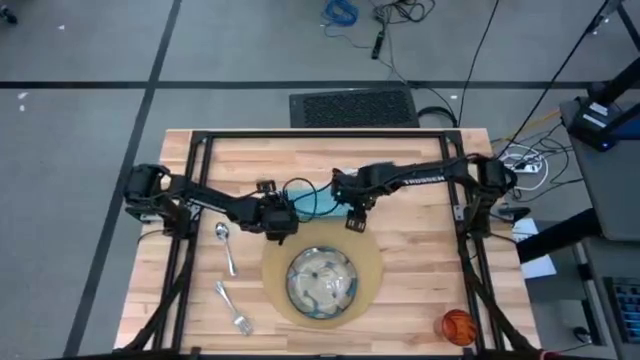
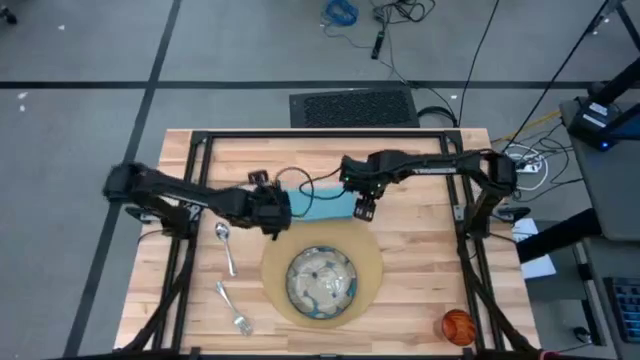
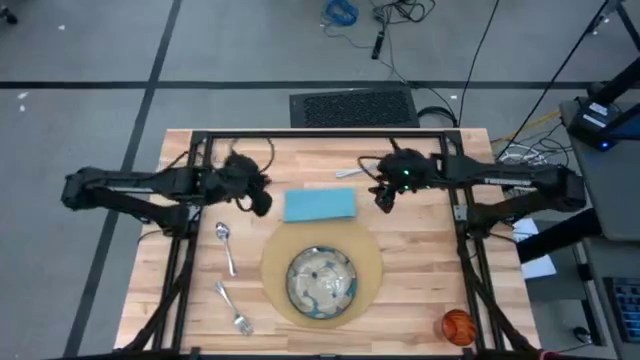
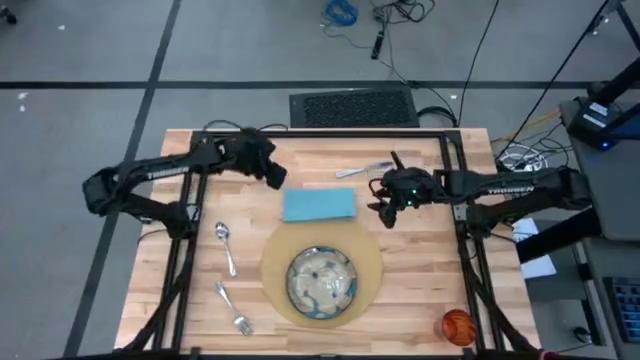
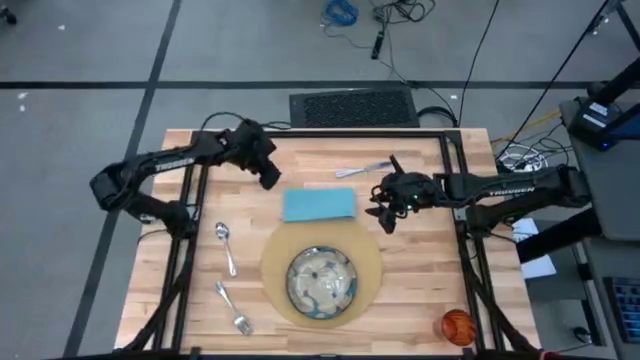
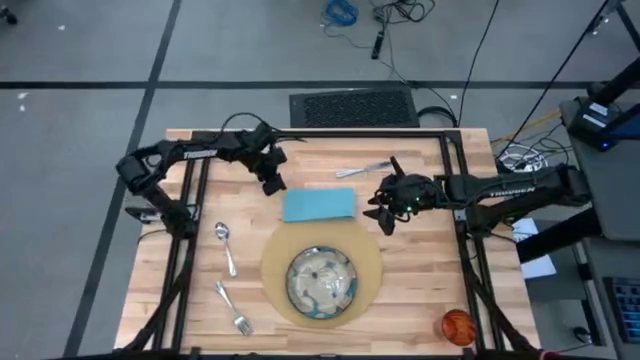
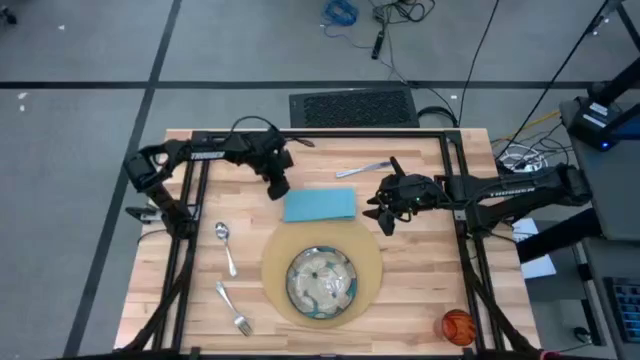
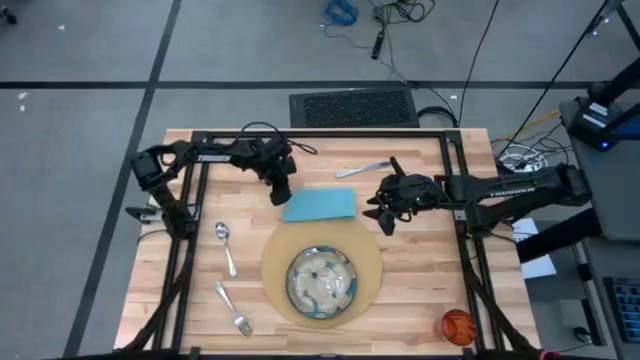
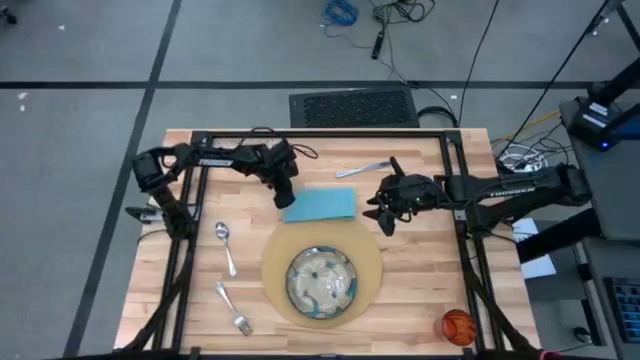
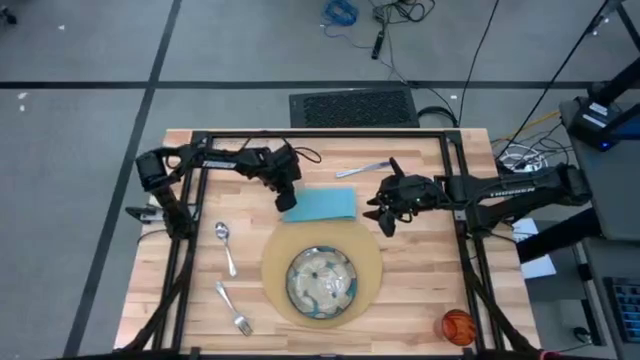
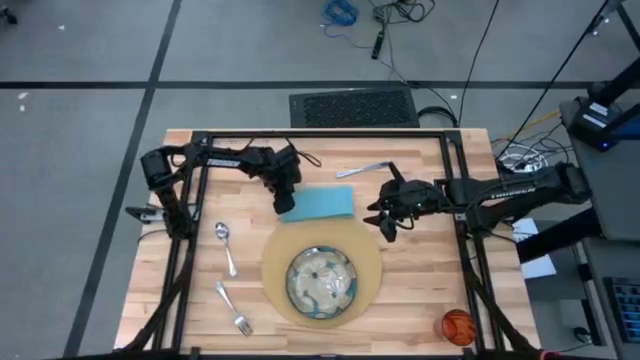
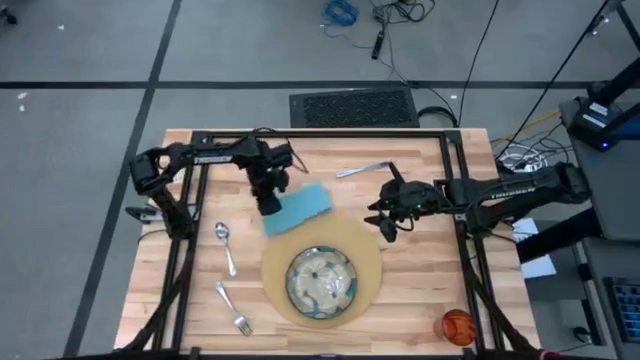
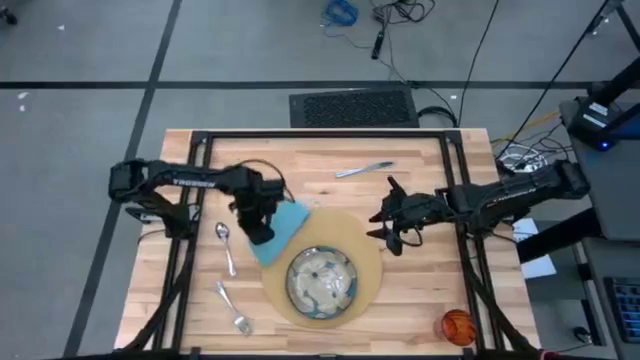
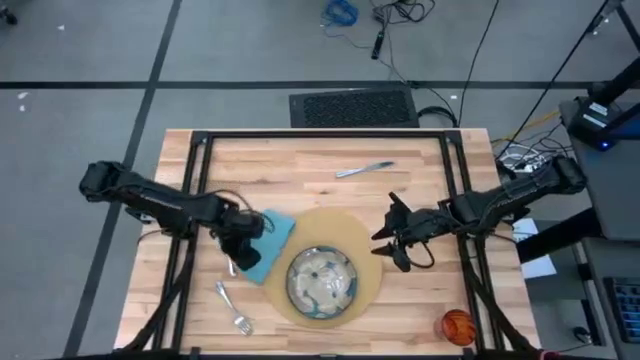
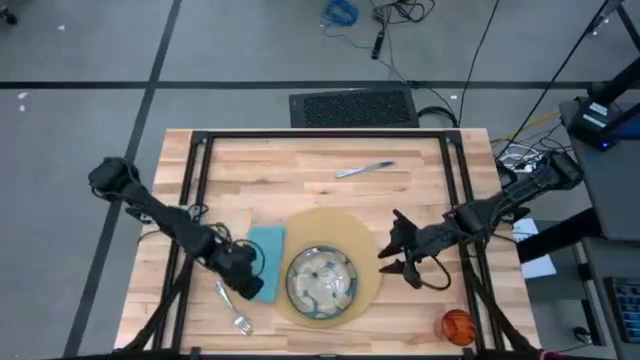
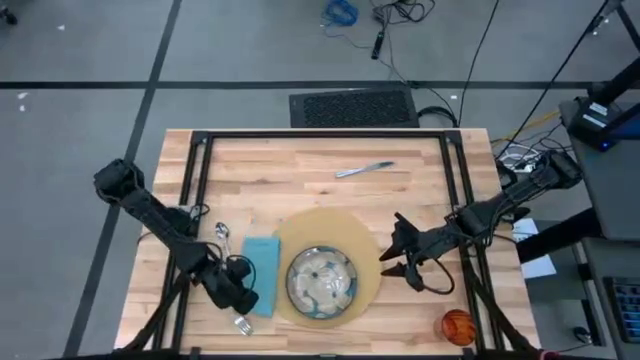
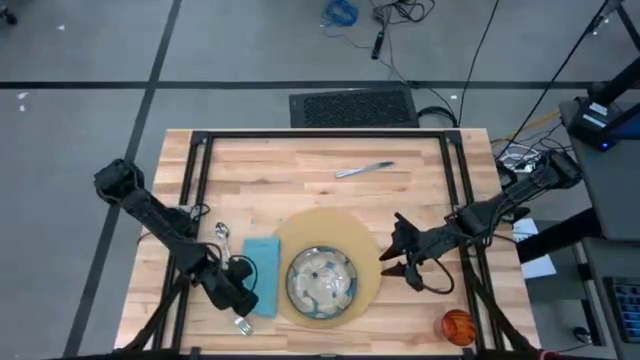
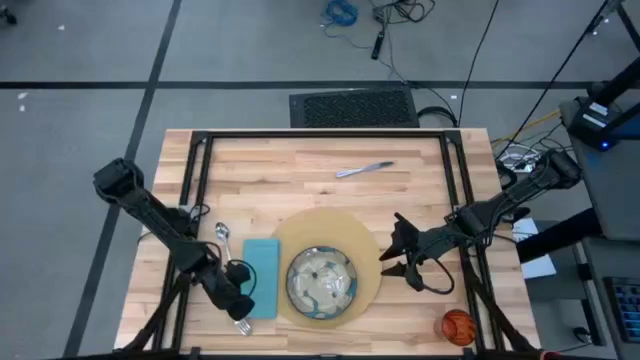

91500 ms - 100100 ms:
Task: Set table place
Move the blue napkin to the left of the brown mat

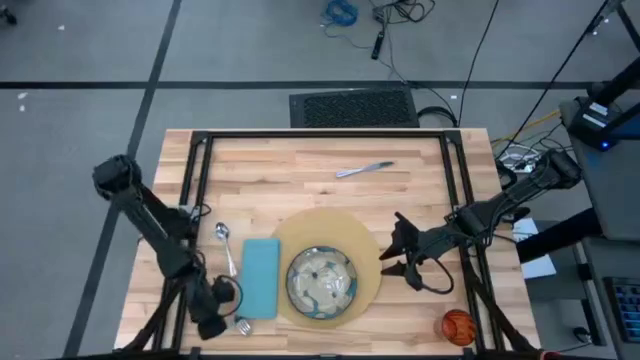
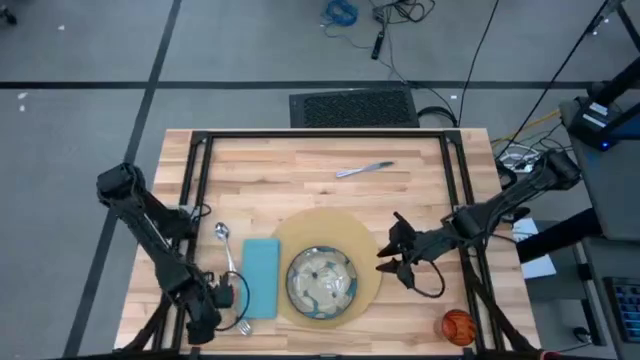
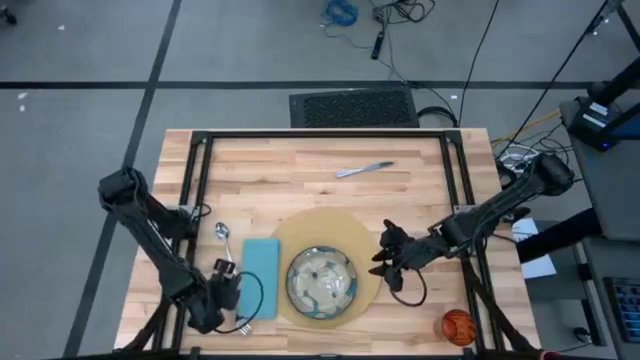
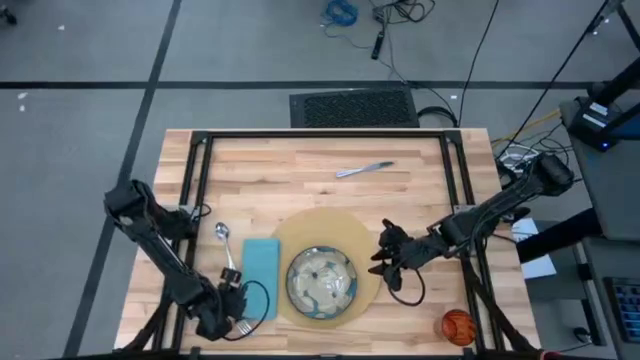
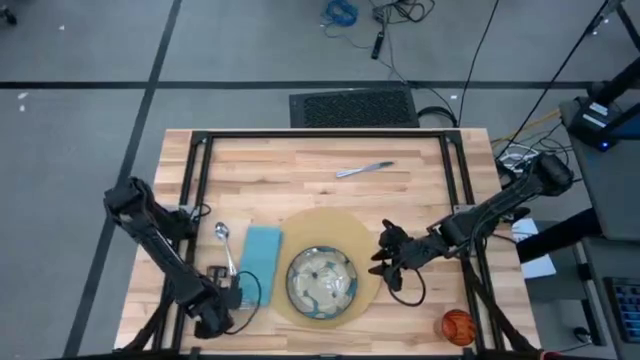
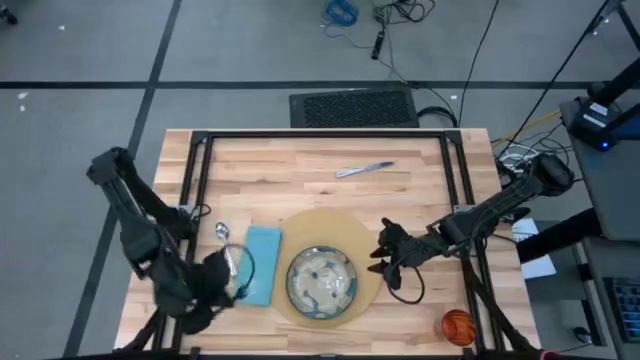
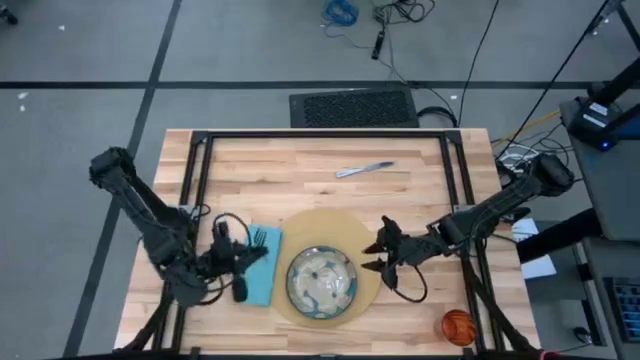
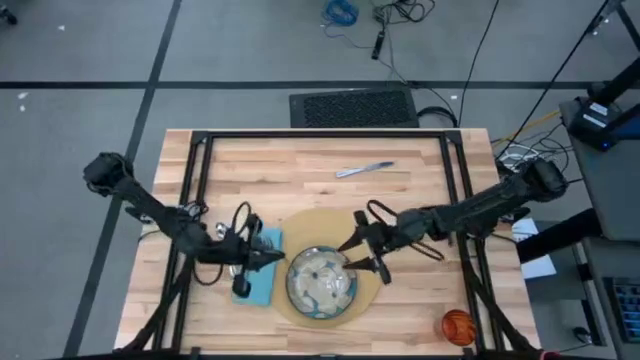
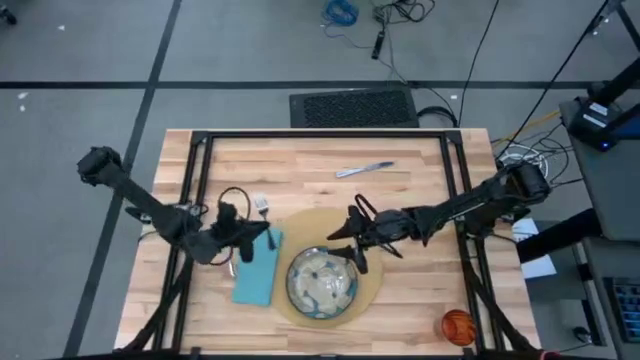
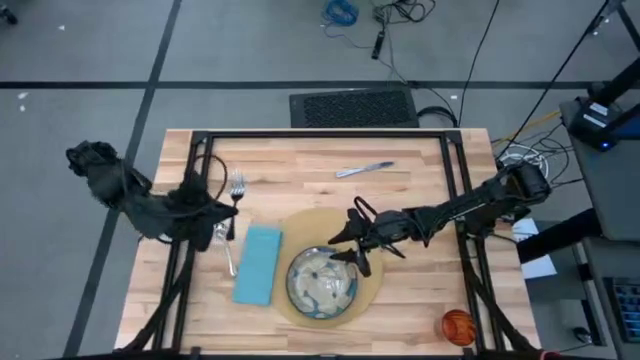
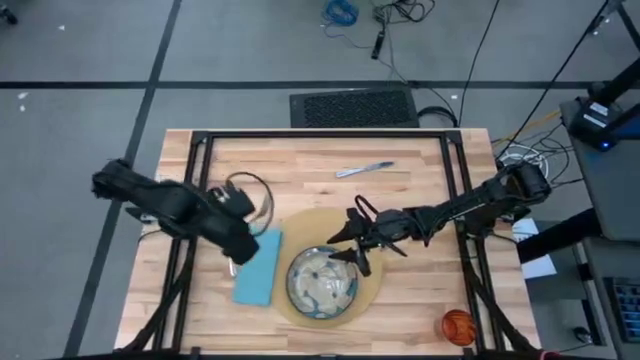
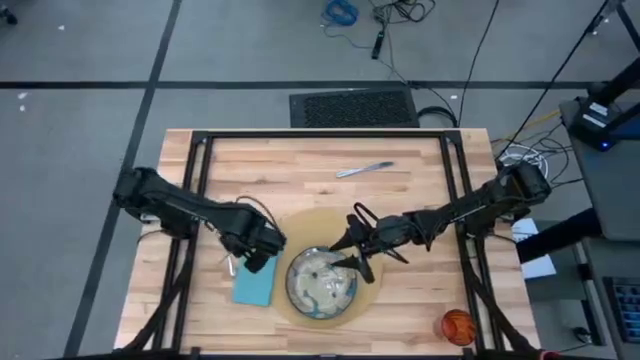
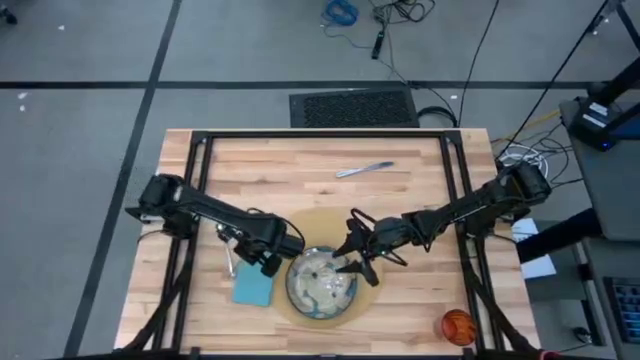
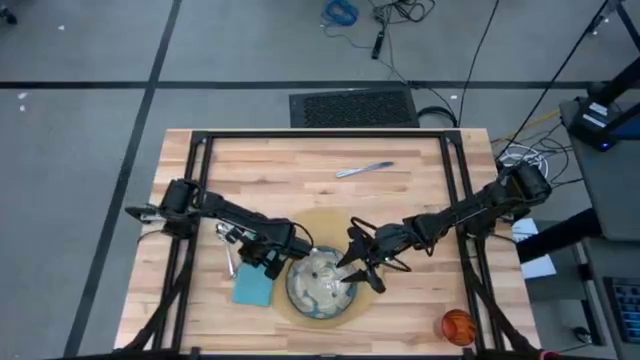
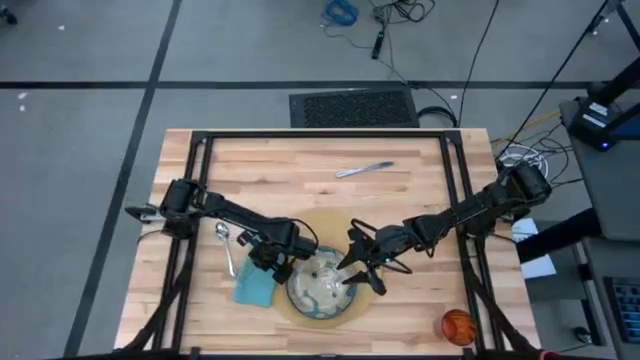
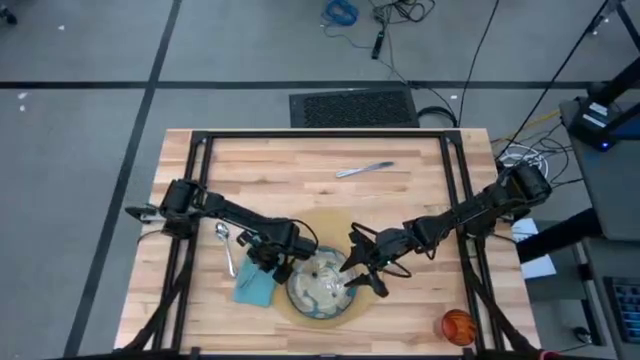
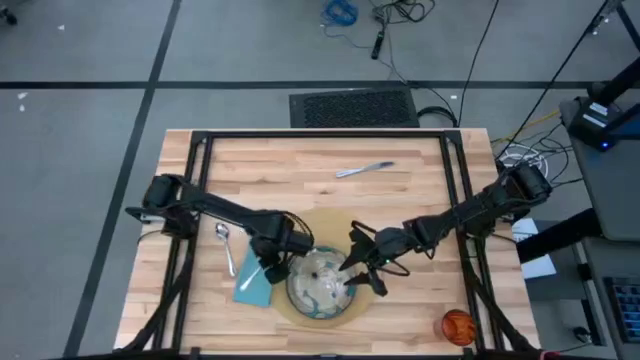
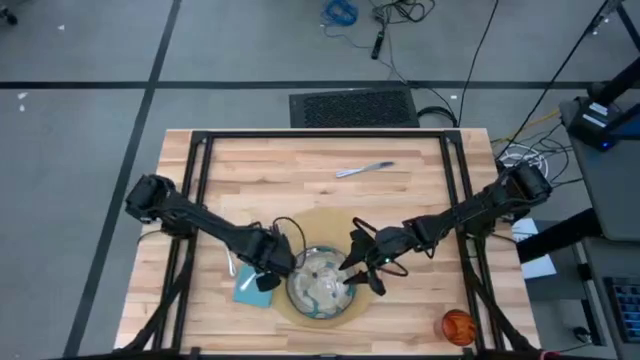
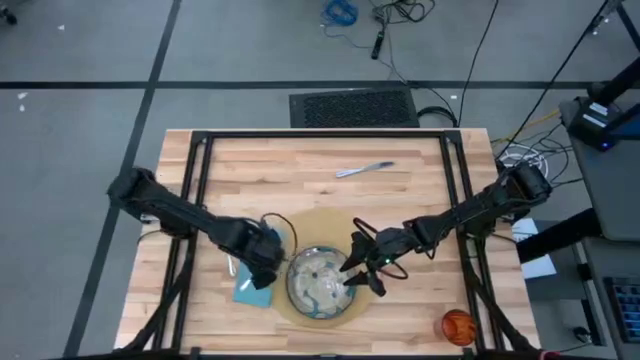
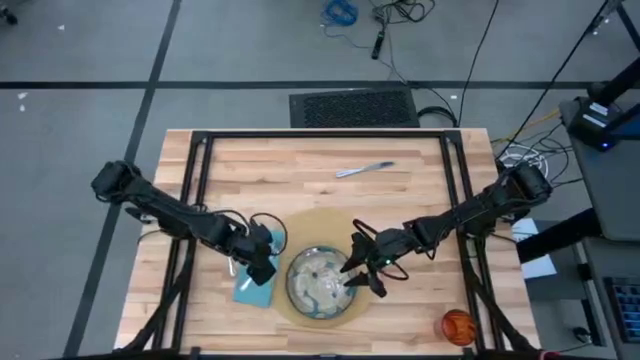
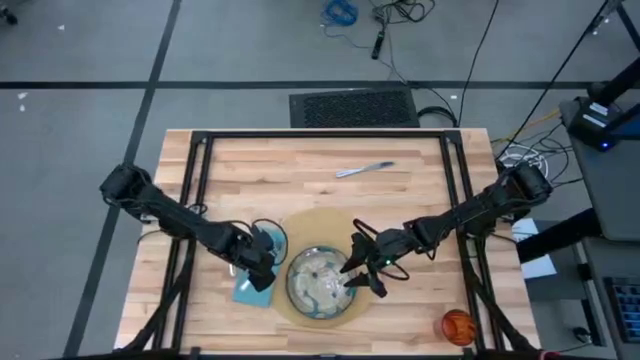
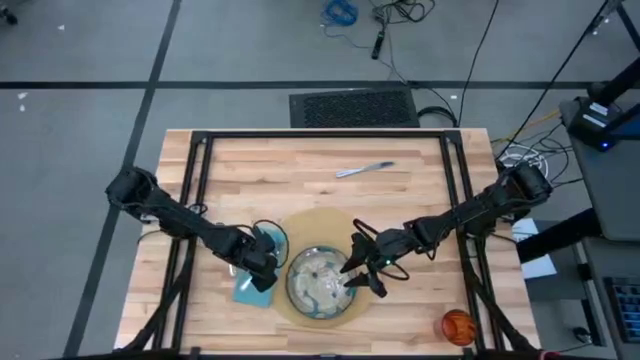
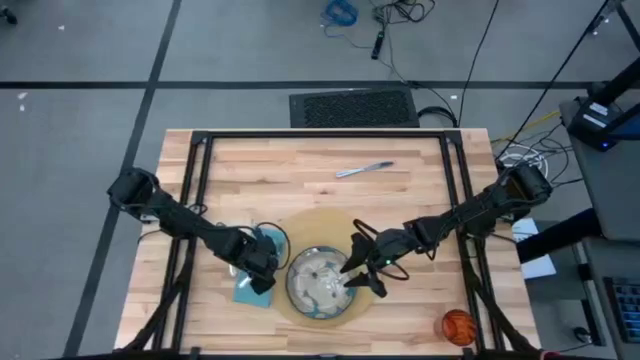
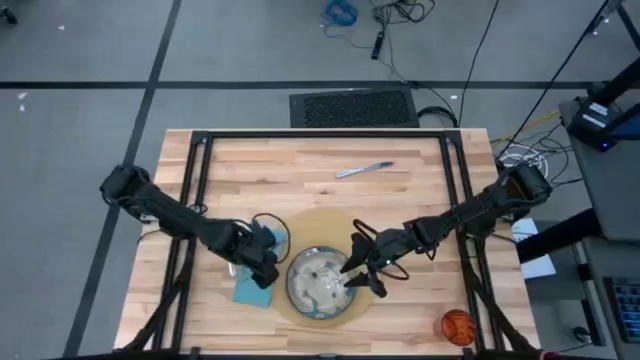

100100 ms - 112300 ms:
Put the silver fork on the blue napkin

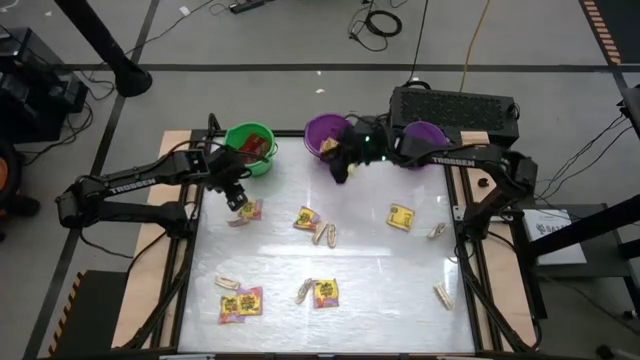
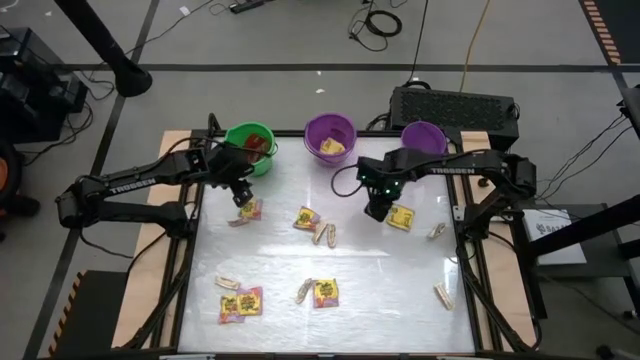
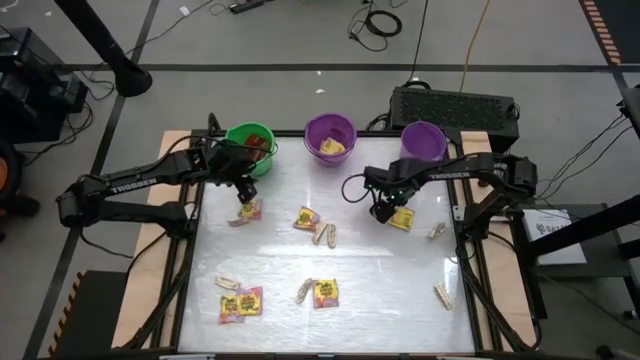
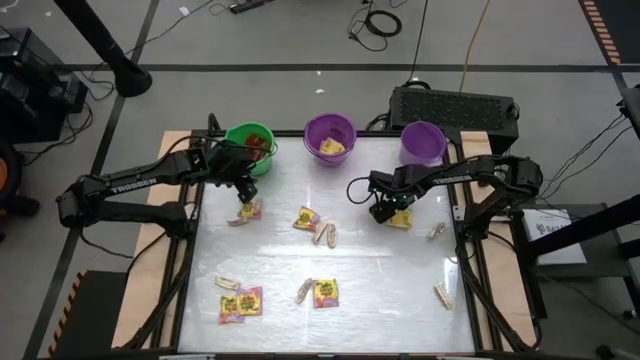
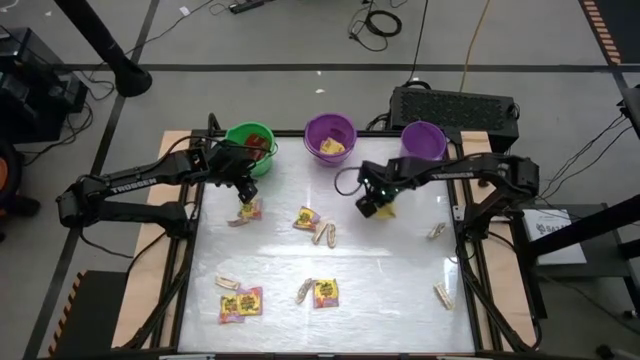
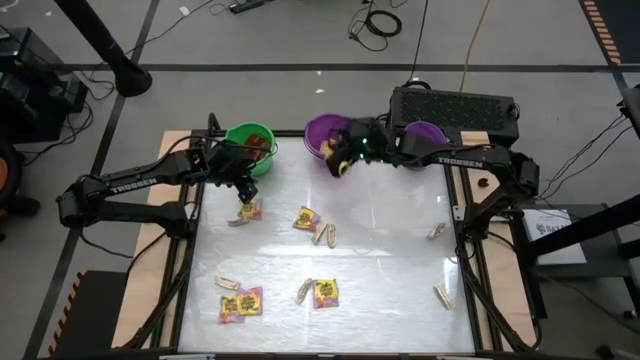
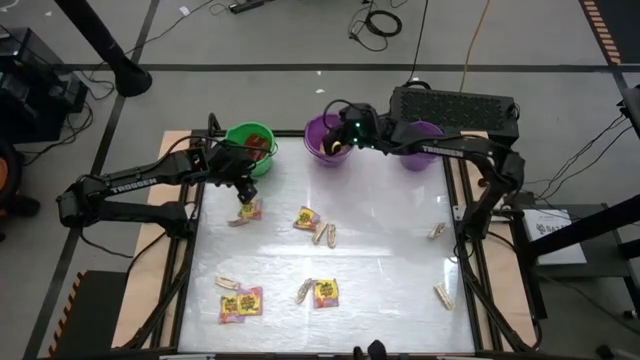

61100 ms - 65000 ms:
Task: Sort candy by brand, put in halloween buckets
Put the yellow candy pack in the left purple bucket
